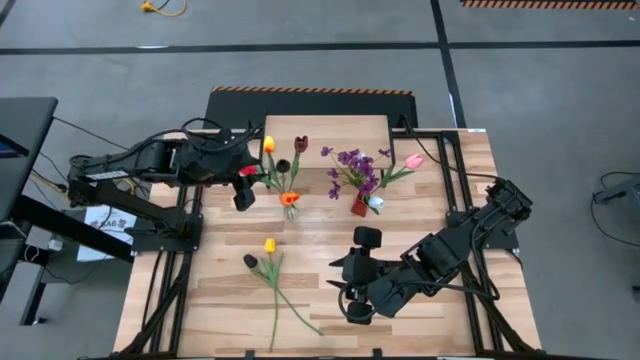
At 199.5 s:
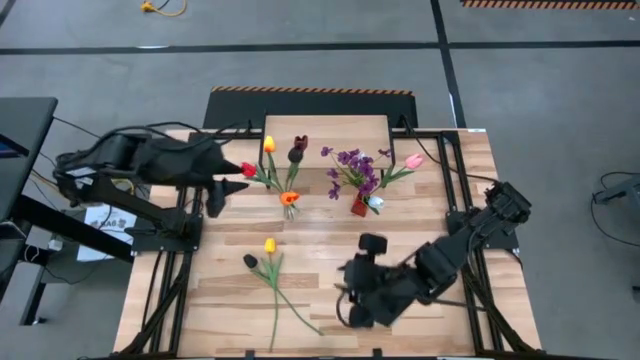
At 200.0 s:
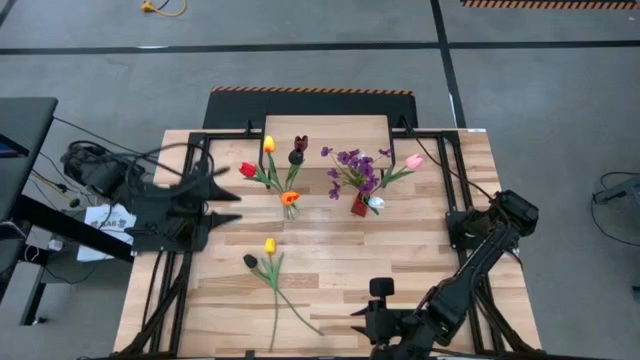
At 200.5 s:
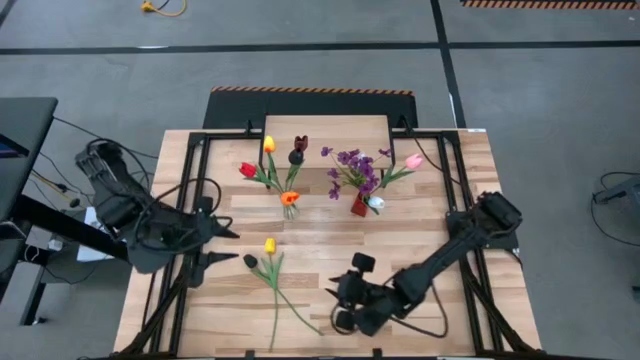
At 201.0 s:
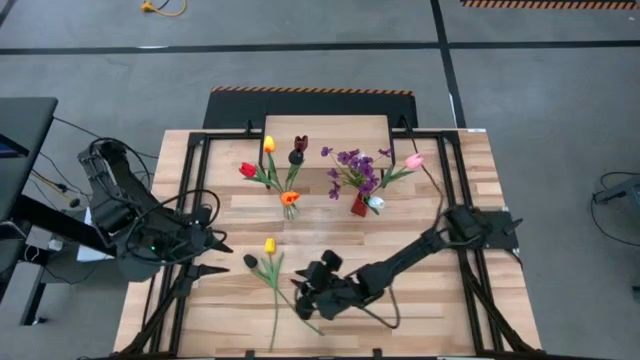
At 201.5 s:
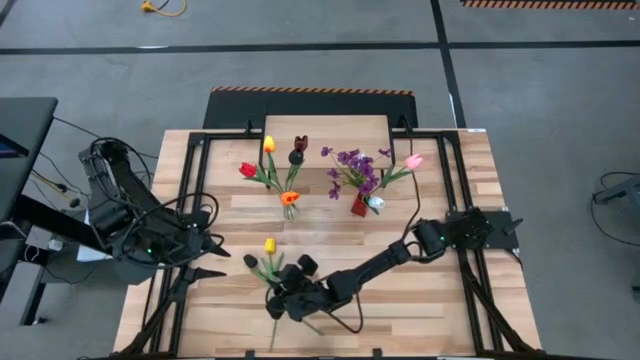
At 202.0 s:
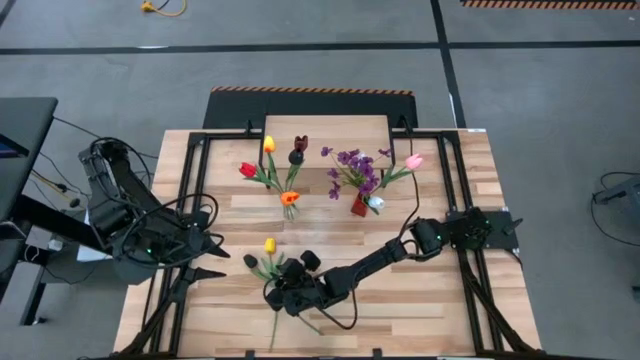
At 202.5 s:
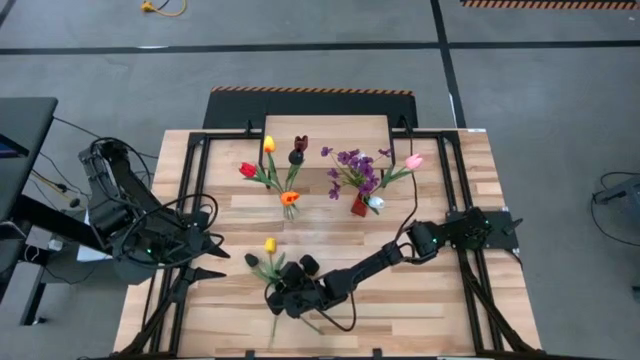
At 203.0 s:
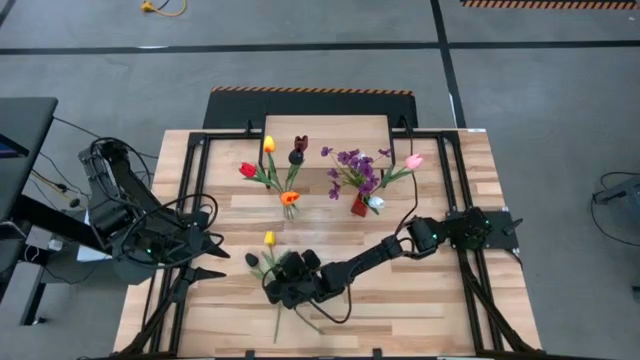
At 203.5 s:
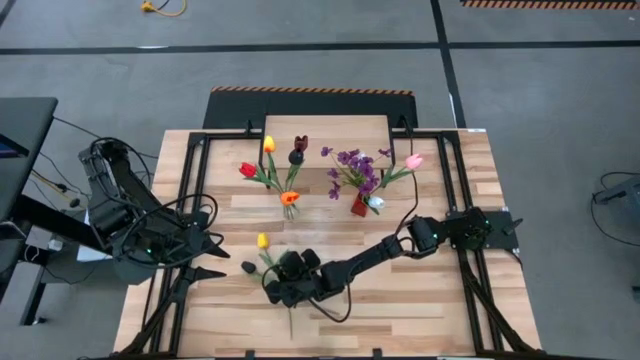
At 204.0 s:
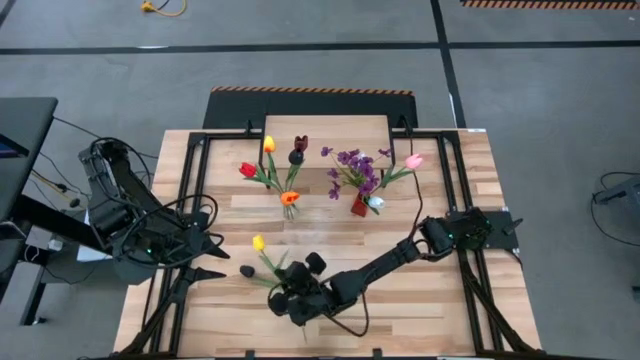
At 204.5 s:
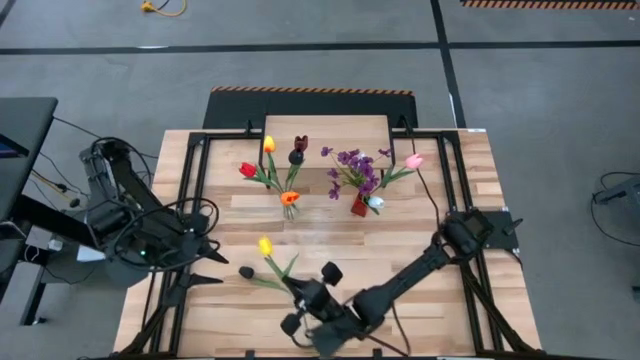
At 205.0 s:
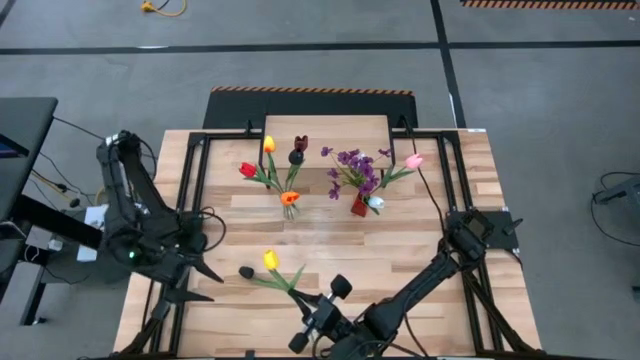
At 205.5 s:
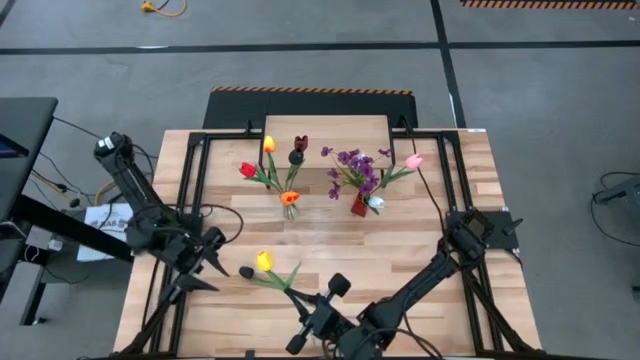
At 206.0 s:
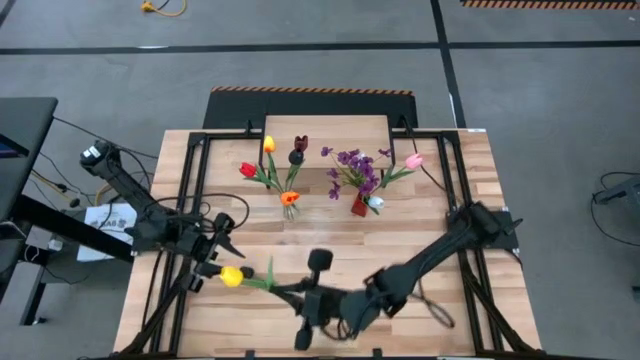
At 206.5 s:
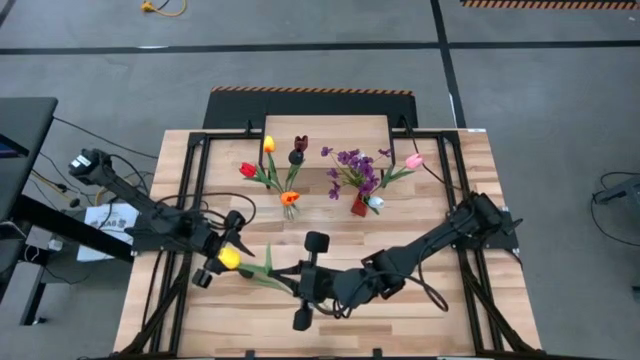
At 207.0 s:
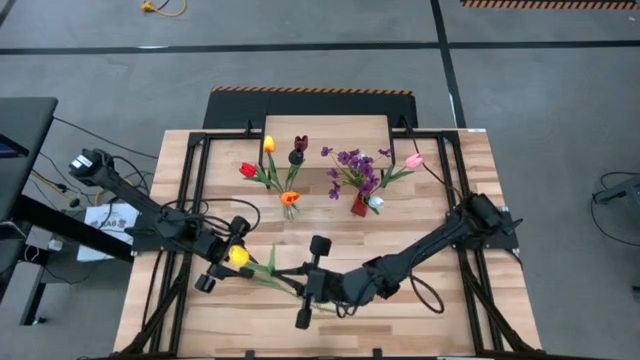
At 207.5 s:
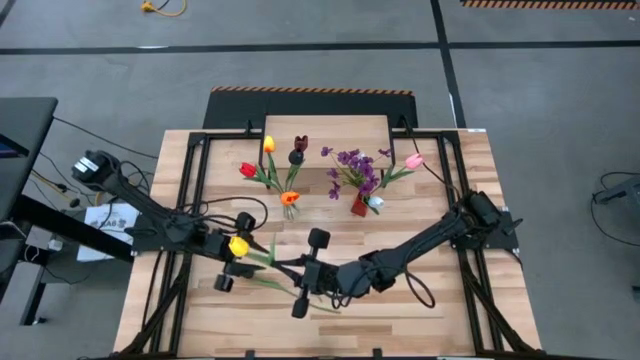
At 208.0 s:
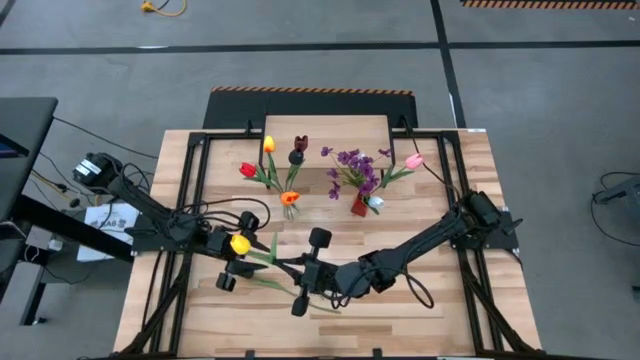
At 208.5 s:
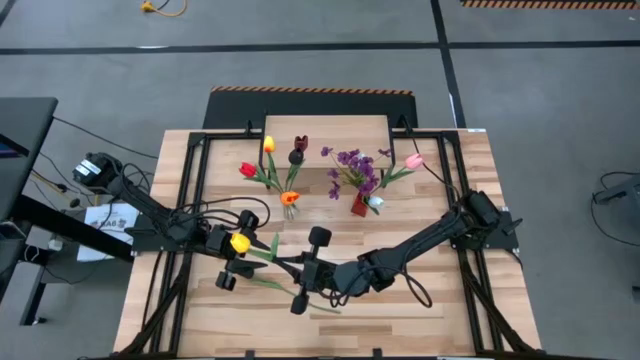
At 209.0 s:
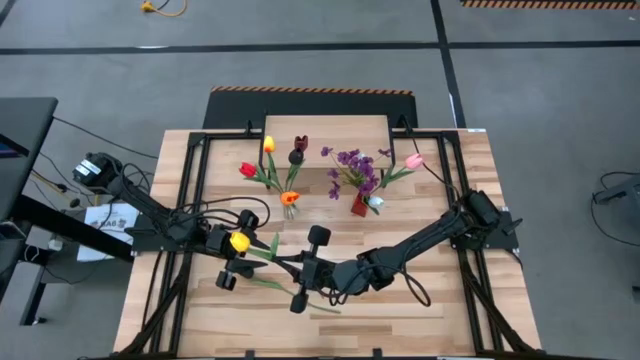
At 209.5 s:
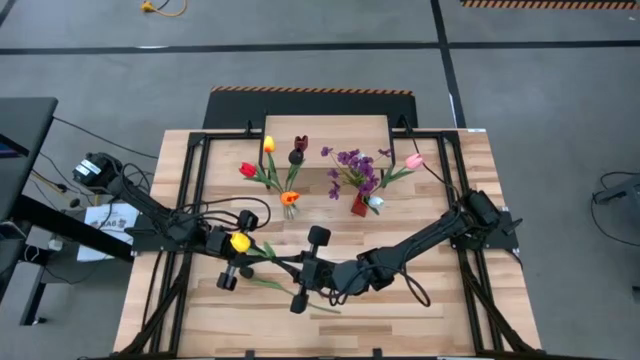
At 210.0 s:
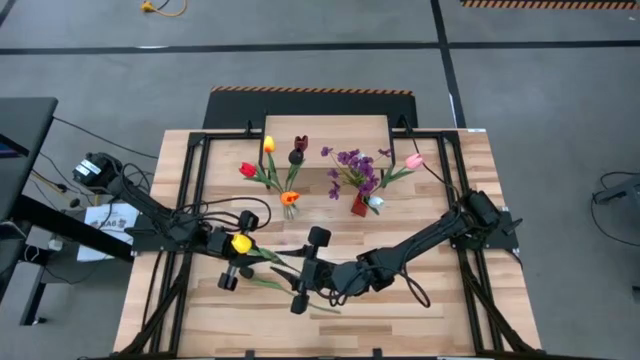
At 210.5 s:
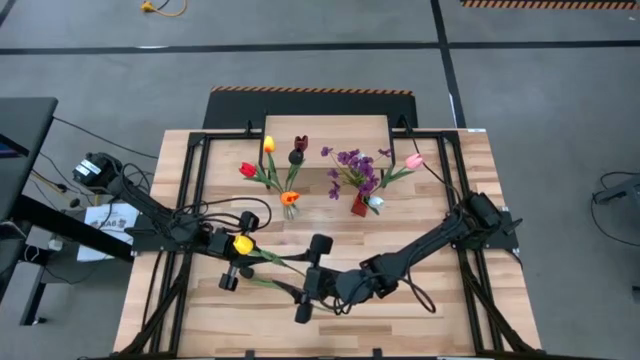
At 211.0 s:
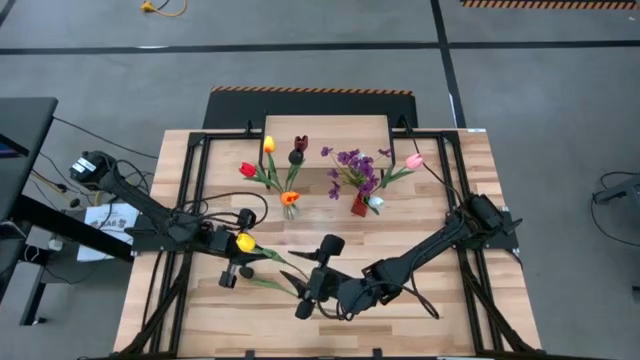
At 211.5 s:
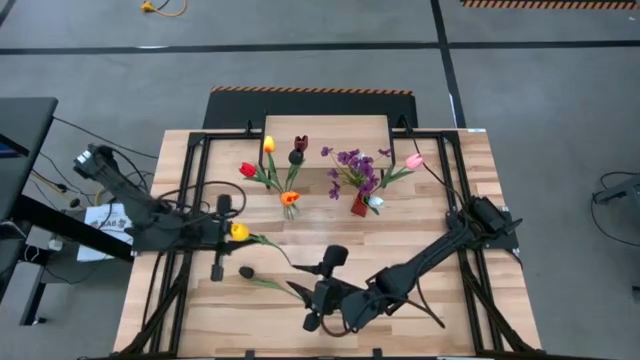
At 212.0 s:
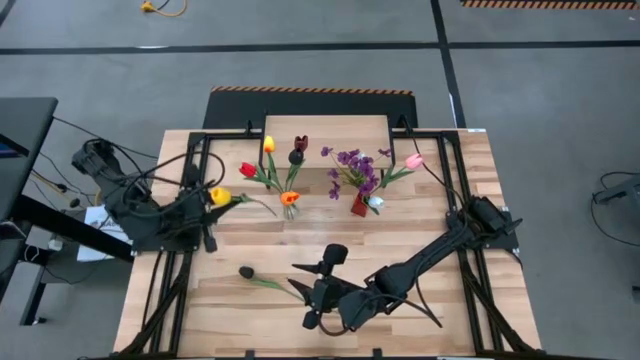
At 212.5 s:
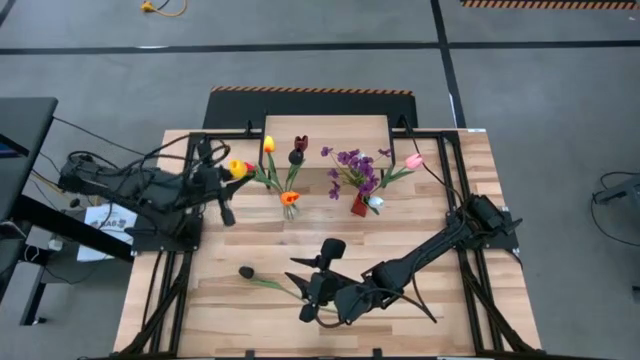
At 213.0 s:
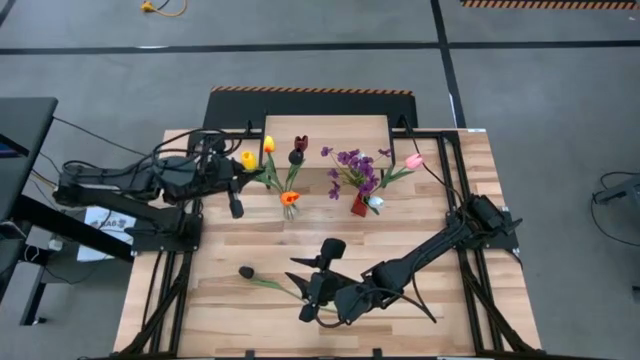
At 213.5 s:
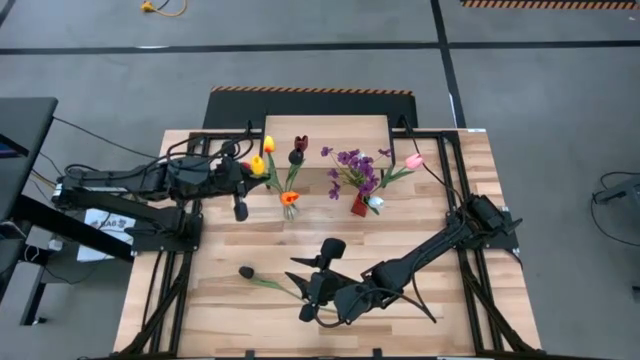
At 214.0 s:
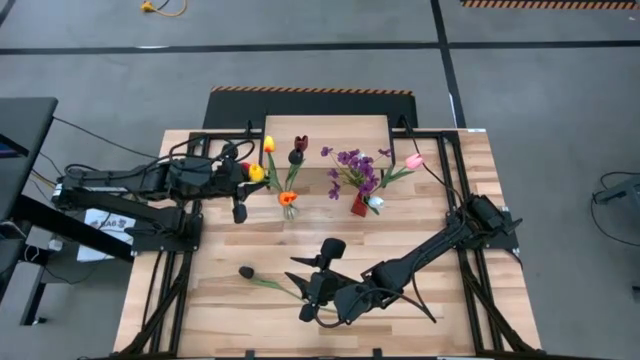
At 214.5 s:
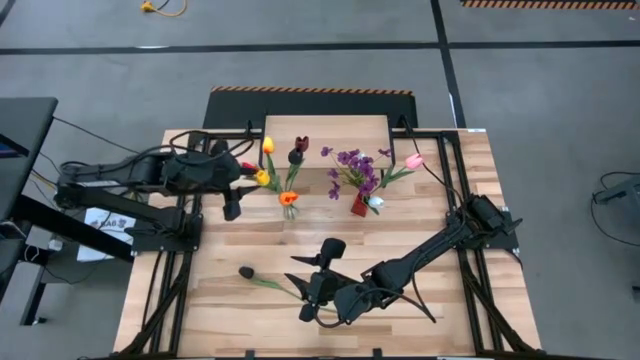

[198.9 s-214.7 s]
Task: Pick and place flowers into a vace then onto a shelf
Put the yellow flower into the transparent flower vase

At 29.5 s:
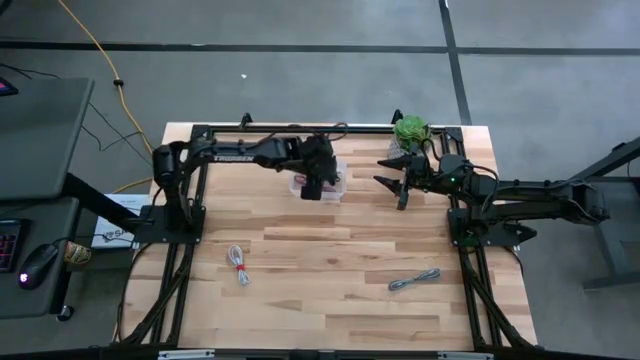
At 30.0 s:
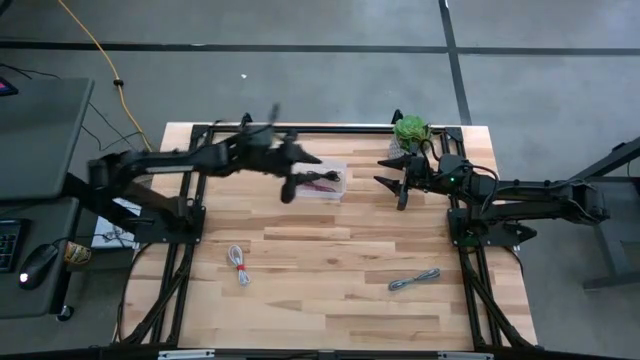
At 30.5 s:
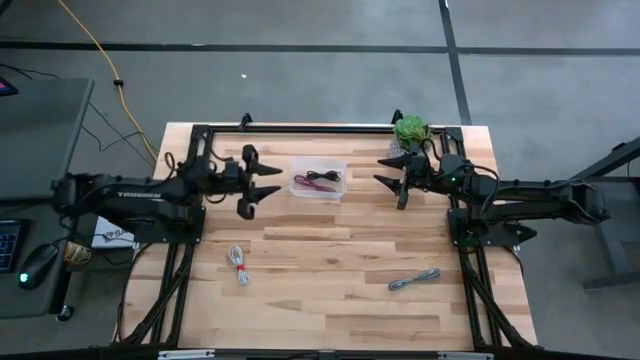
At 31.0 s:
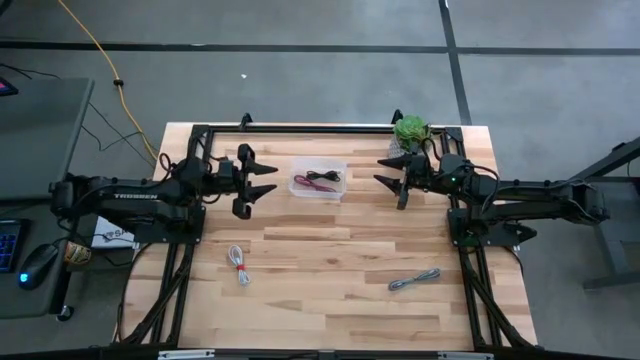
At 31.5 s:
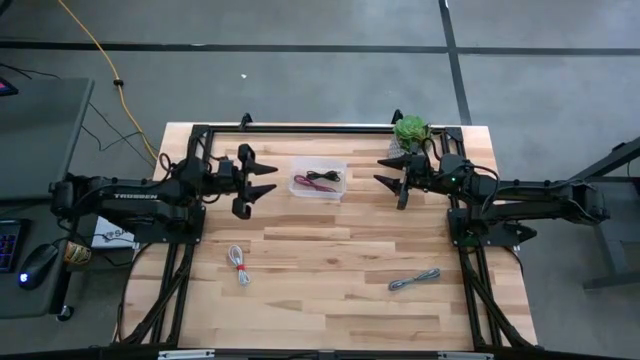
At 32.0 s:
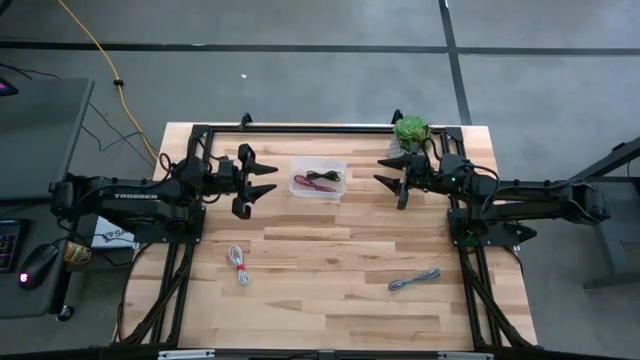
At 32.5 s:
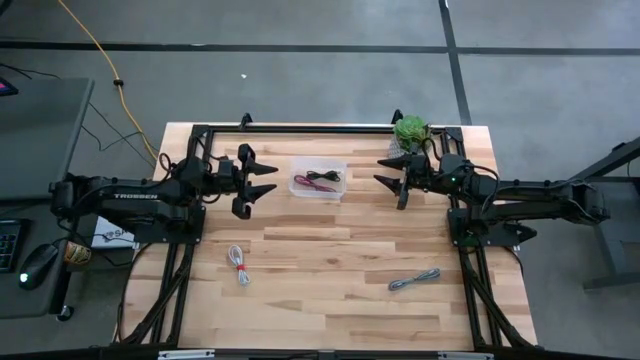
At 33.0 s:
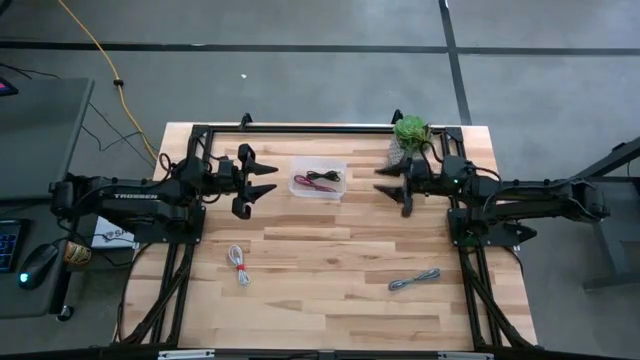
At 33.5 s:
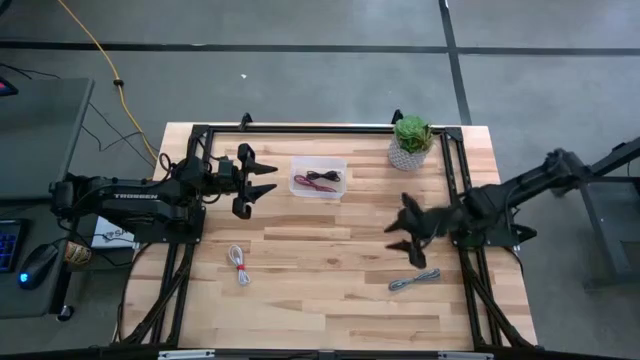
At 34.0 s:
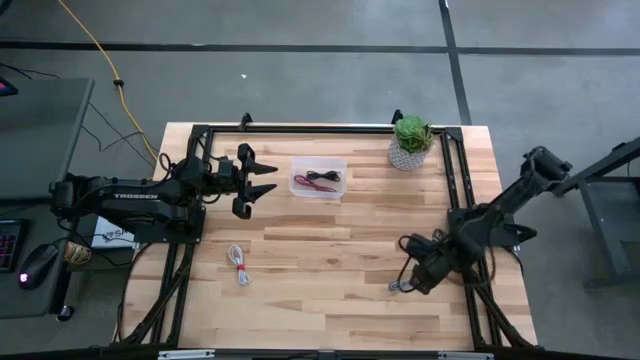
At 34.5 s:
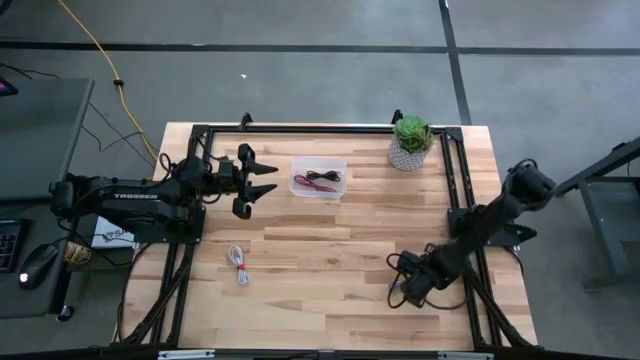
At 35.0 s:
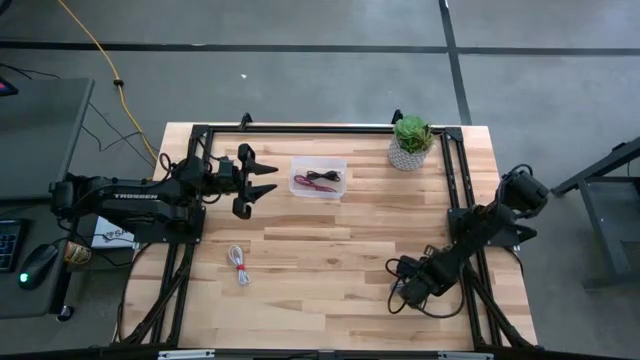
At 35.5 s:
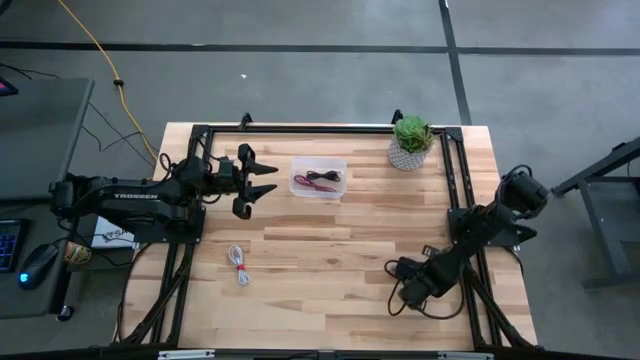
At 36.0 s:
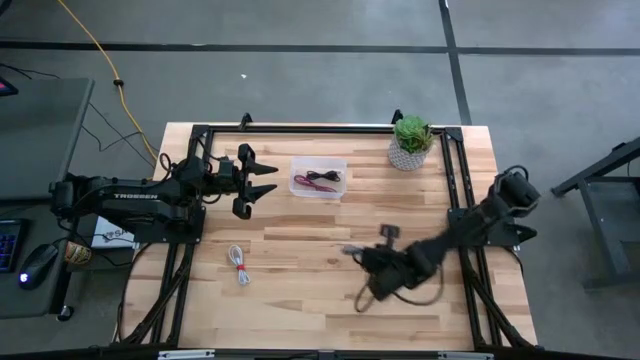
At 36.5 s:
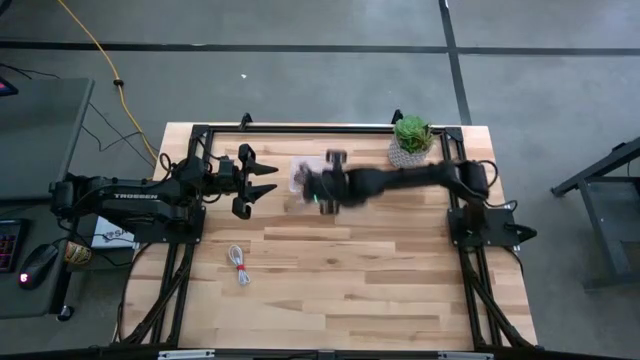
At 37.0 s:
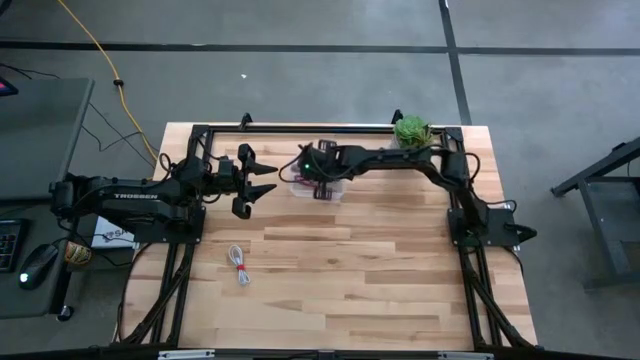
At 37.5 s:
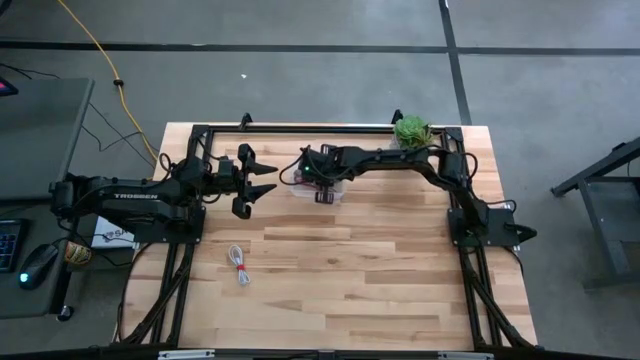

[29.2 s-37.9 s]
Task: Pick and place USB-C Cables
Put the white patterned charger cable into the transparent bin
